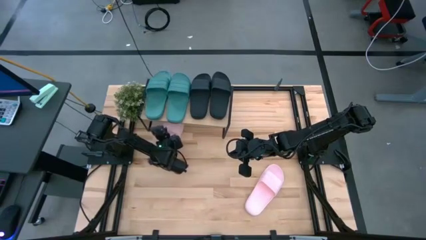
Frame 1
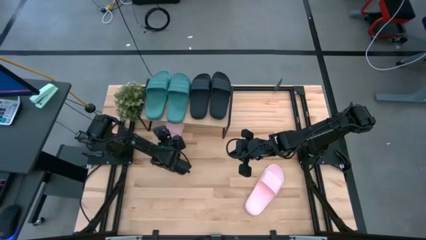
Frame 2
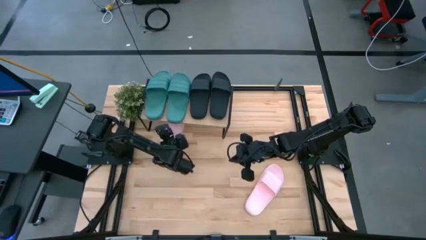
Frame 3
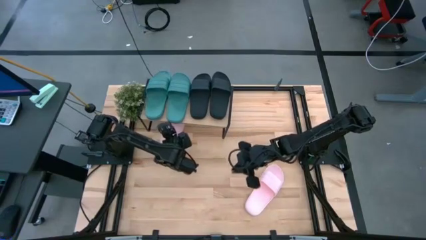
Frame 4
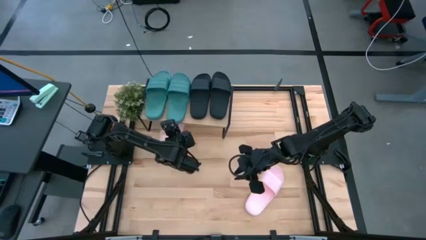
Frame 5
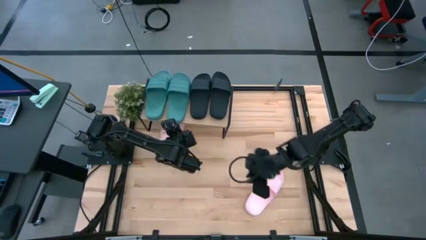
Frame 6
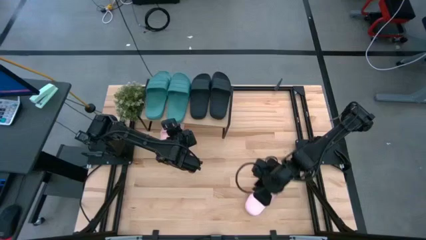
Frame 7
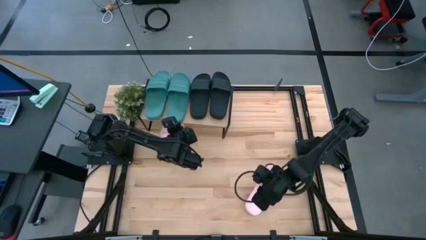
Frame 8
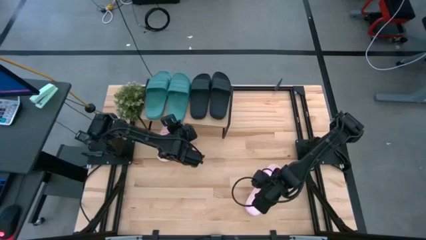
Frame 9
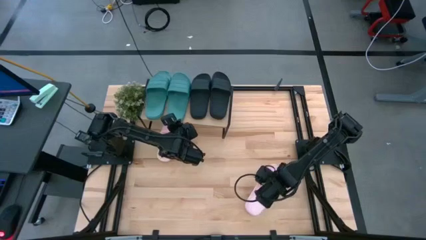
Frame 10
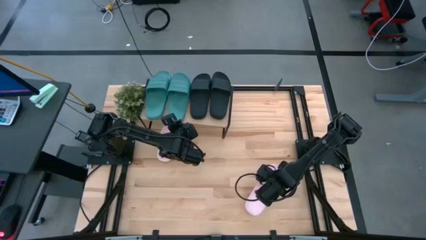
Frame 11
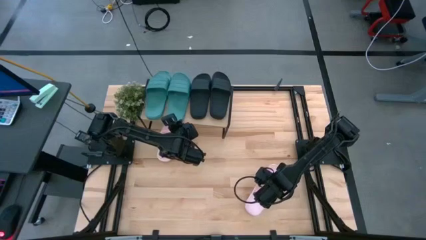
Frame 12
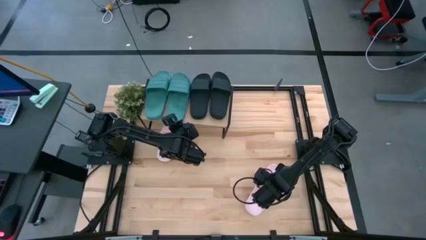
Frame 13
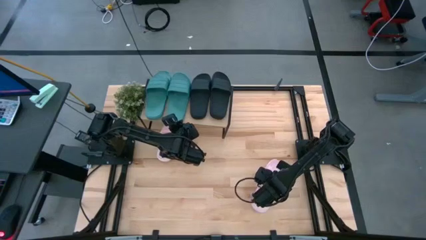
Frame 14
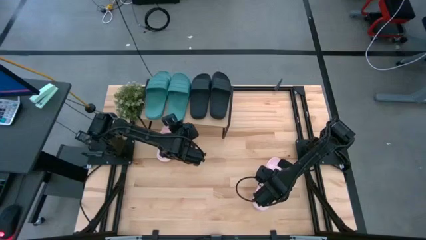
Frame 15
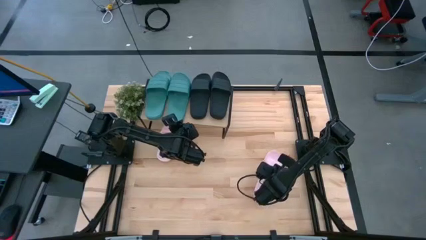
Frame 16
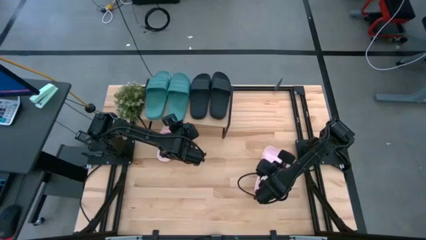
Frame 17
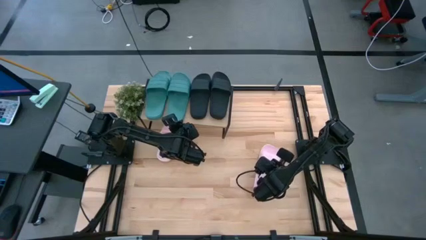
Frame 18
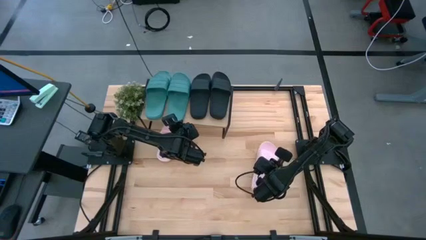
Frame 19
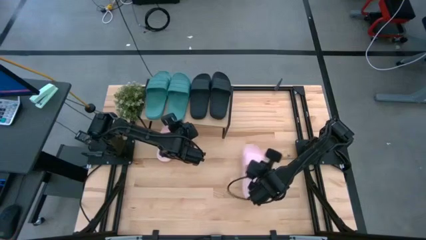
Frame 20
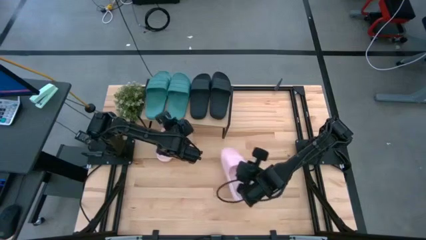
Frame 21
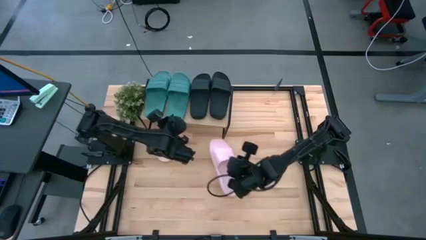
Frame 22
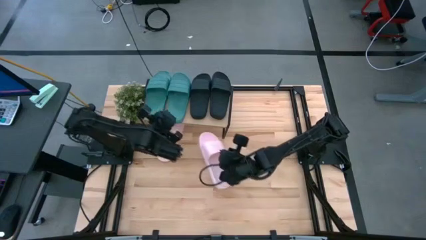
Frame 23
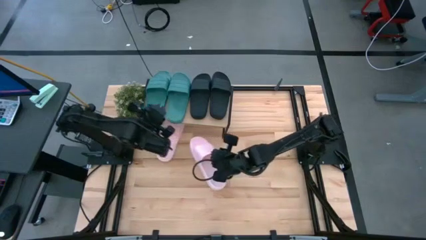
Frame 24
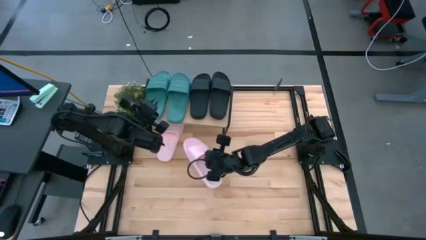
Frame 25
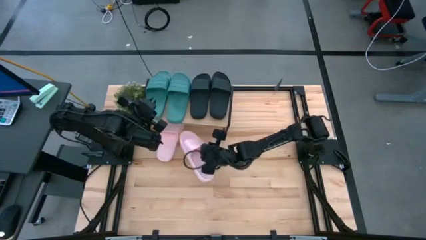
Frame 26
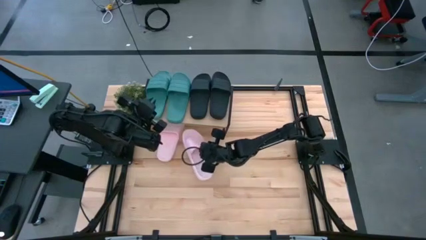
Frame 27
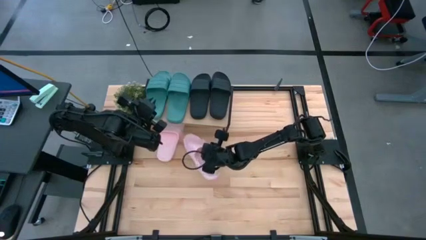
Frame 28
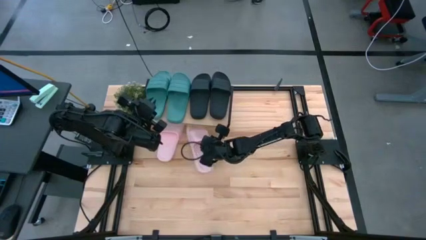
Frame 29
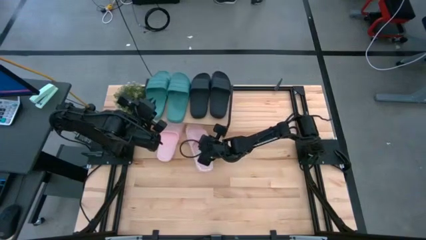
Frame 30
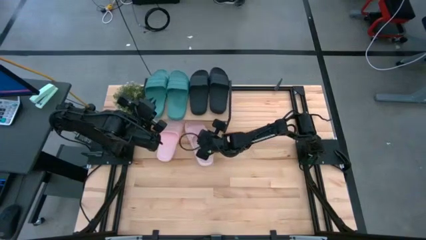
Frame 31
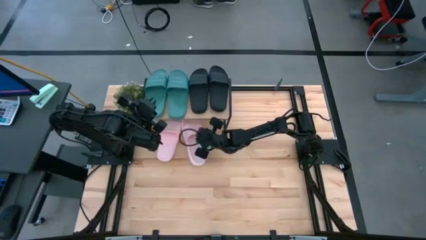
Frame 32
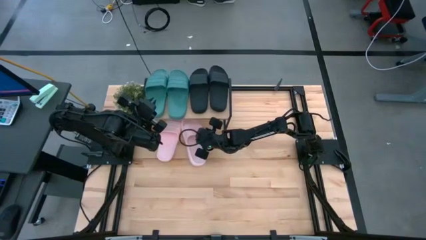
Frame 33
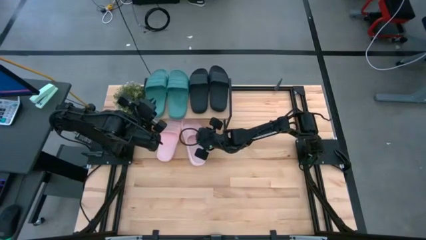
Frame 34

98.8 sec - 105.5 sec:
Task: Pick and place slides into the shelf
Put the pink slide under the shelf

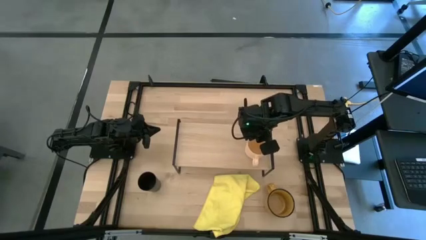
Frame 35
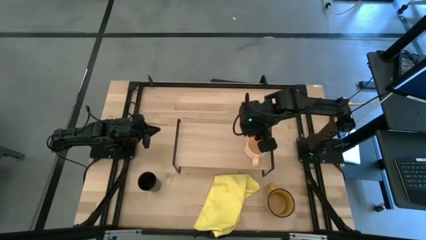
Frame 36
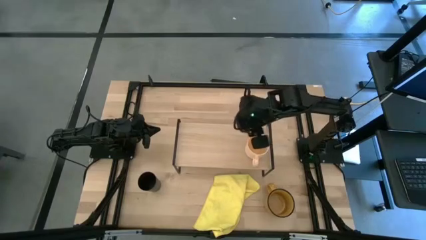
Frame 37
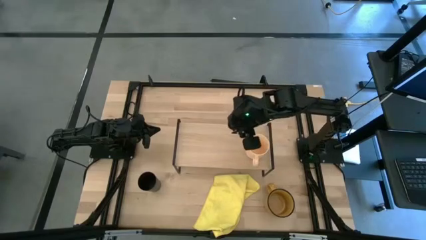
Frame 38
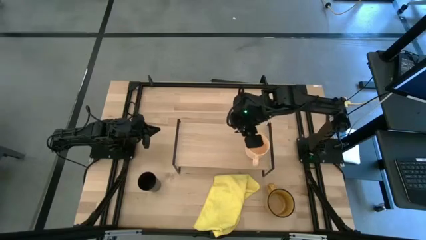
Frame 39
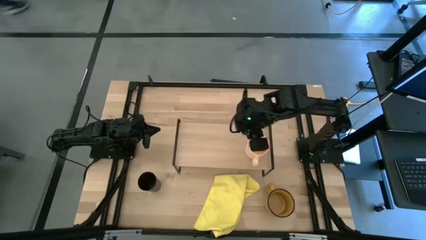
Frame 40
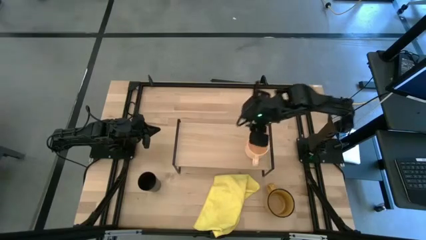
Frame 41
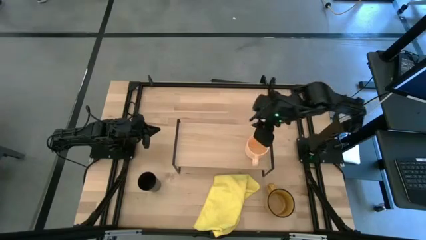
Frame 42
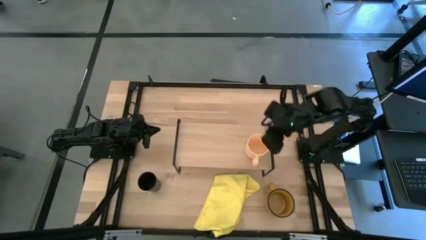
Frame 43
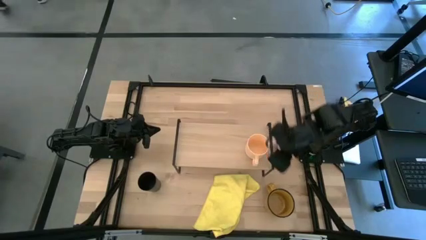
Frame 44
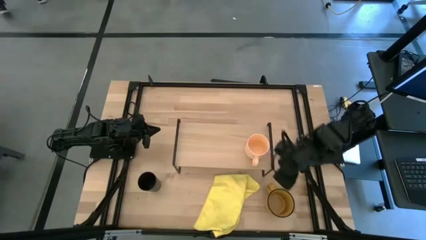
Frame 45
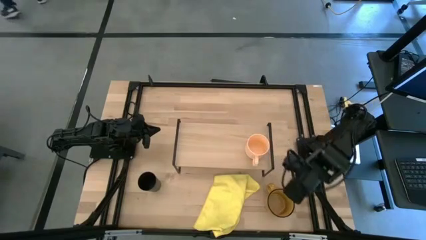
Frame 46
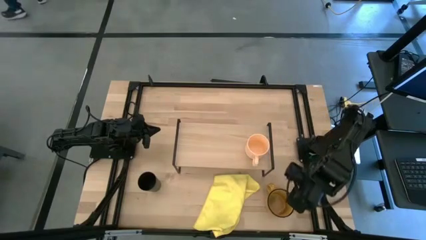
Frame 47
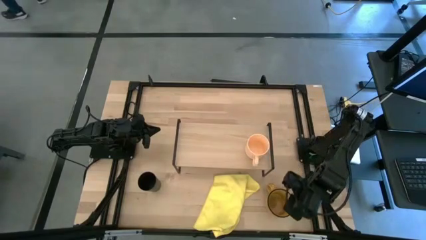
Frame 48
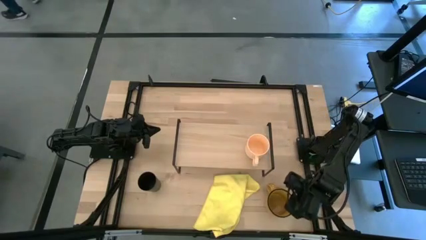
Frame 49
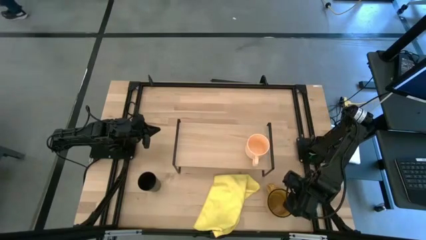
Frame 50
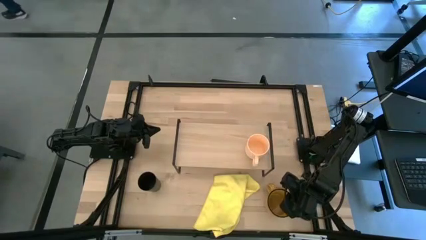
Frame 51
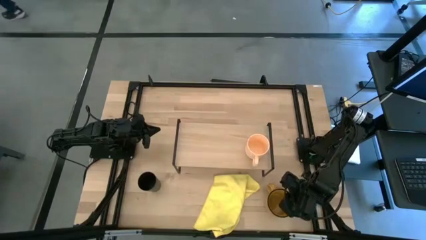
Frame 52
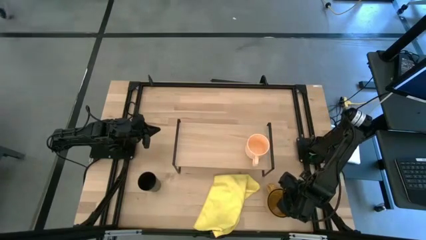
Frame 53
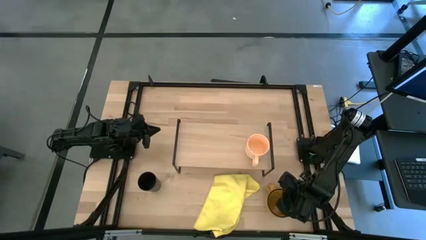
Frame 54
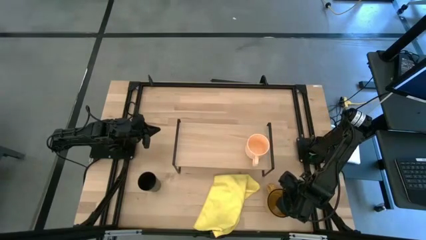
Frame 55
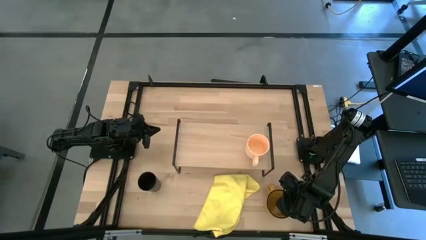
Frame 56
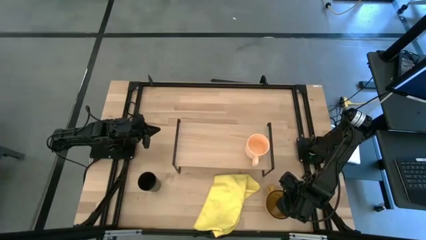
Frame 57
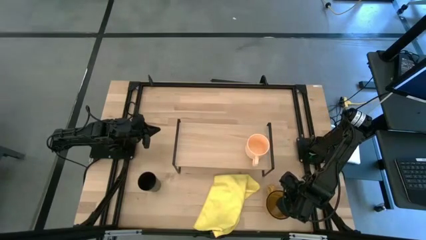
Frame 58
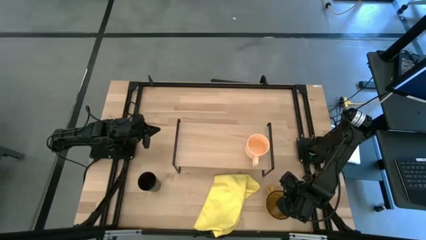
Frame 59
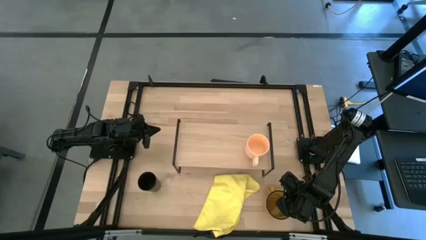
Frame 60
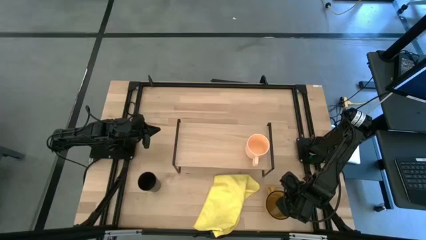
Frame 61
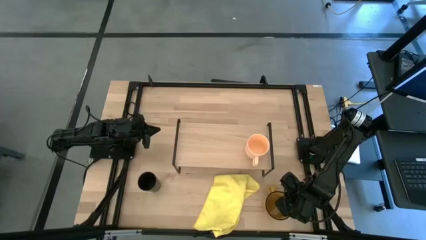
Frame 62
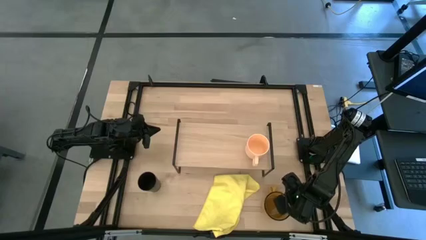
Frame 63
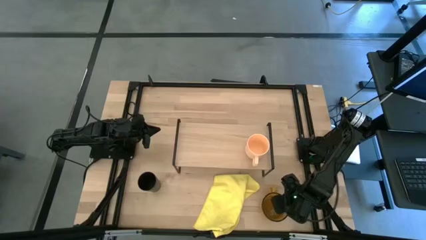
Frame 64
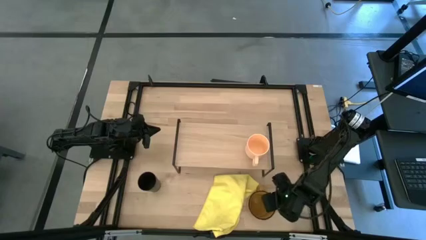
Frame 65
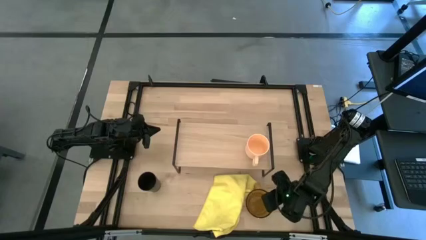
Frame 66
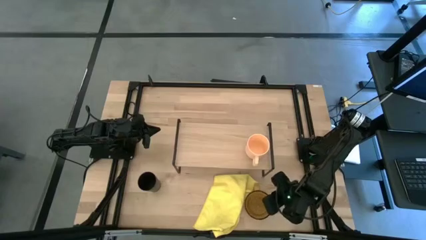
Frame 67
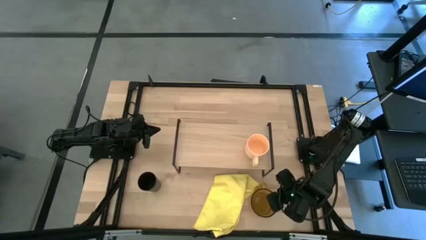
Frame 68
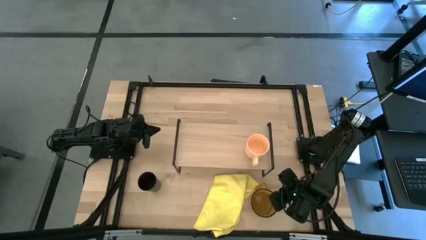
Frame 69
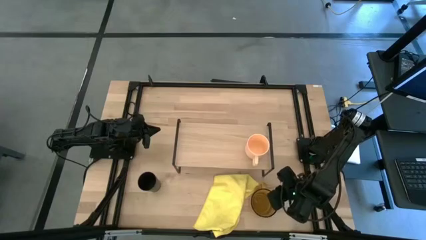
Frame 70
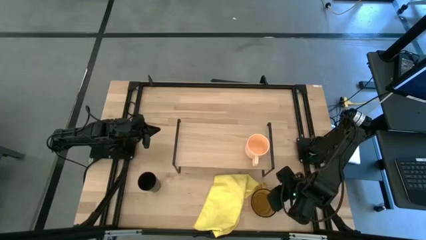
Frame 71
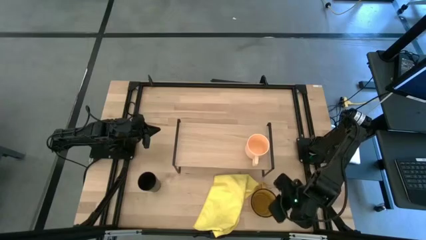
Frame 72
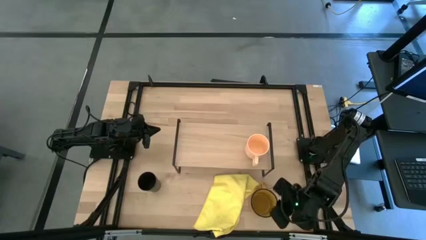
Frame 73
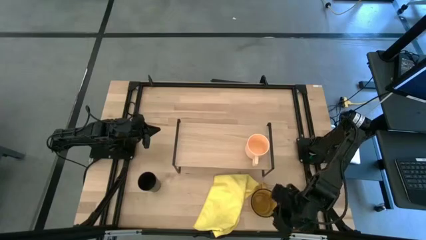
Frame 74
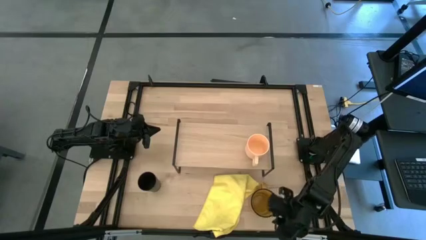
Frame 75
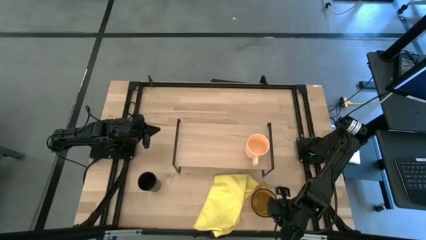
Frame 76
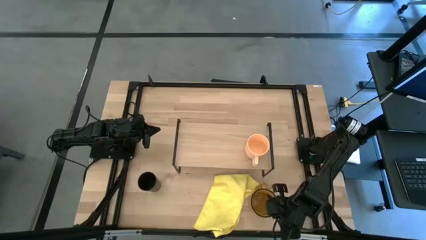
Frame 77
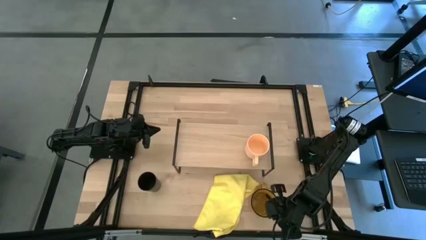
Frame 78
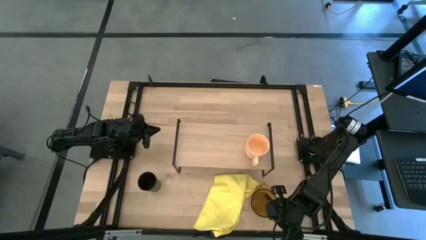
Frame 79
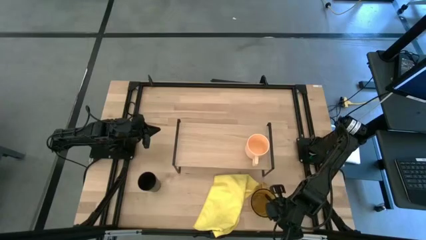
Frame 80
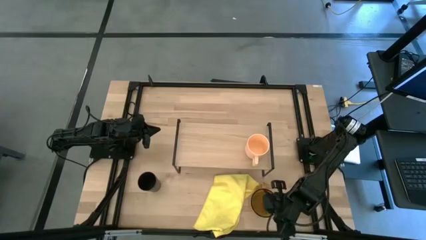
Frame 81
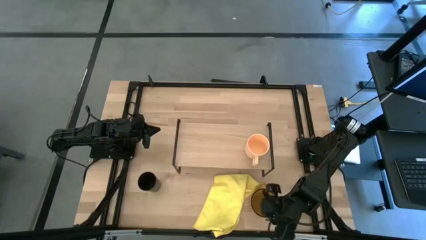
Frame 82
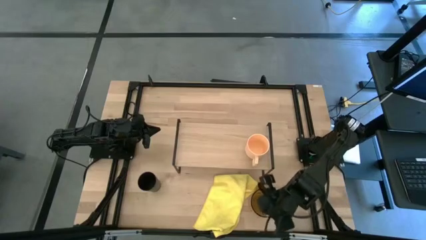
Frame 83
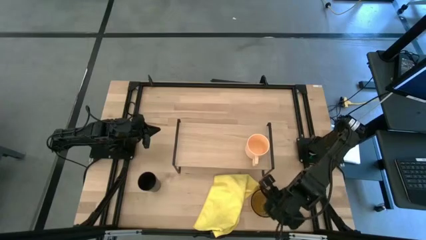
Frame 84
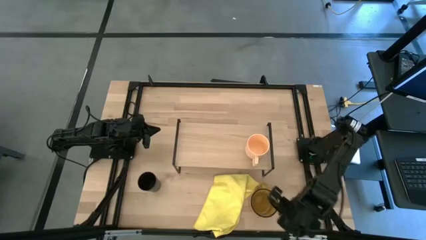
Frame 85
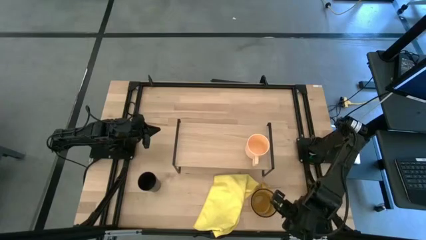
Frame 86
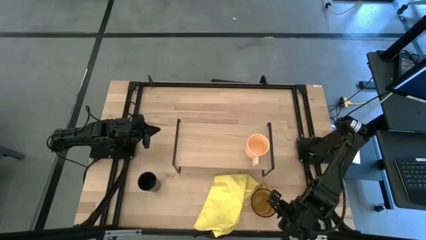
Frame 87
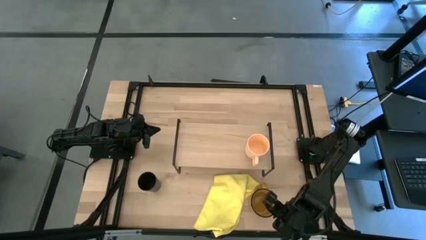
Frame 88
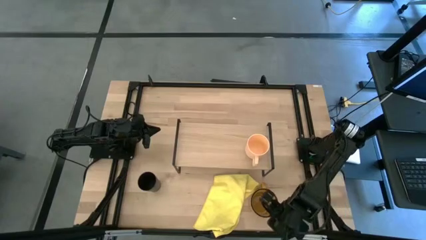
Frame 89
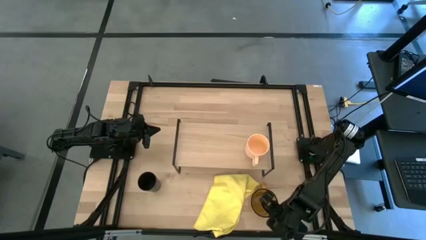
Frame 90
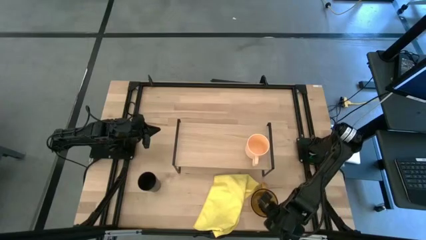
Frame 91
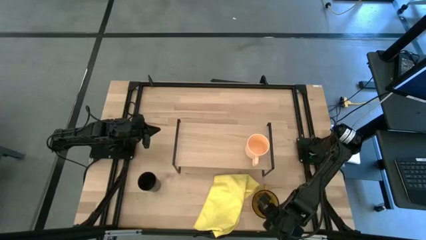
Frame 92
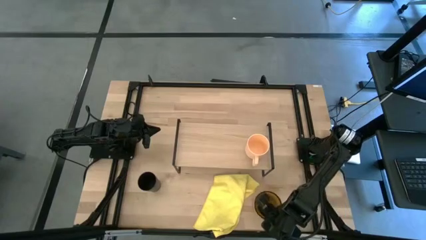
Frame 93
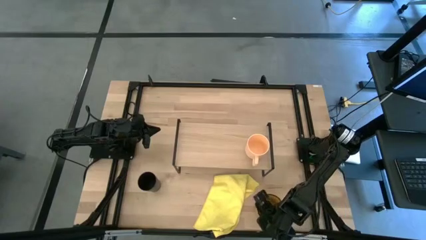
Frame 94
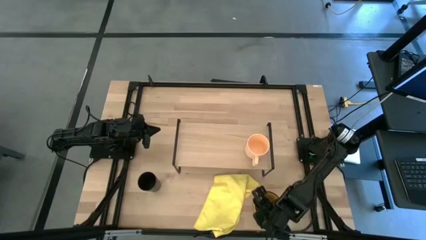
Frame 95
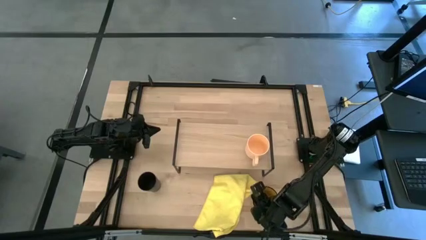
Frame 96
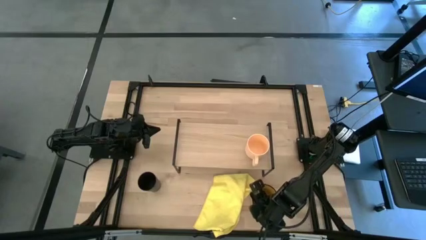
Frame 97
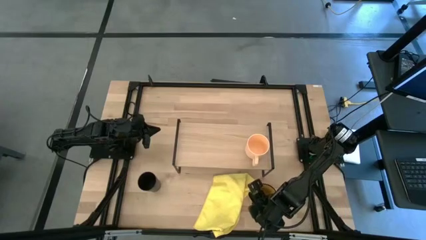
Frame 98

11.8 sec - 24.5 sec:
Task: Stack small to large cups/mugs on shelf
Put the yellow mug on the shelf
